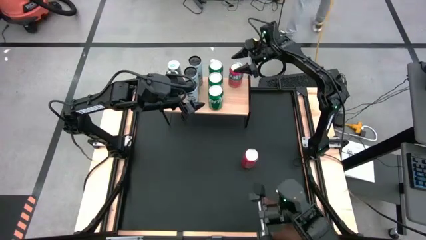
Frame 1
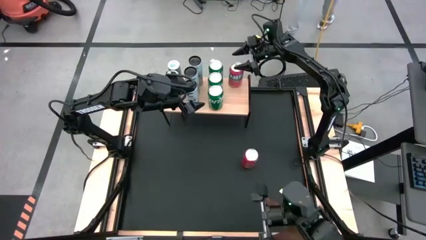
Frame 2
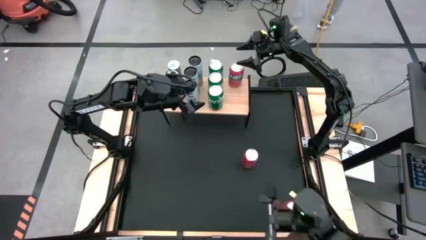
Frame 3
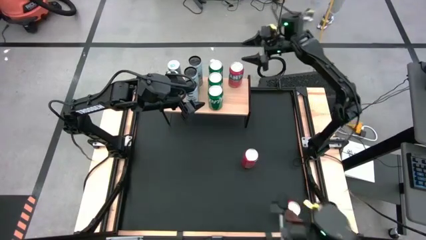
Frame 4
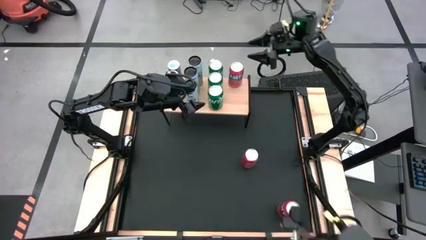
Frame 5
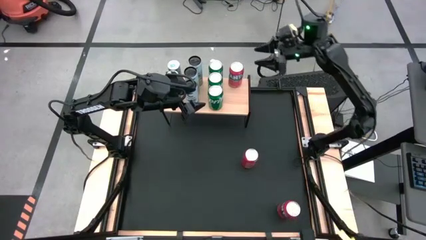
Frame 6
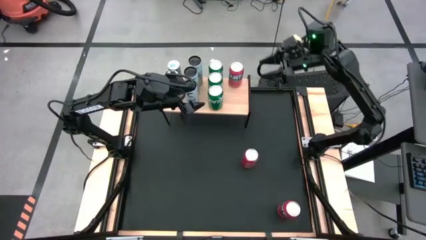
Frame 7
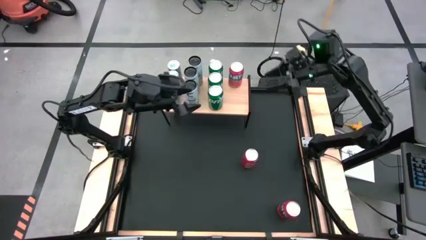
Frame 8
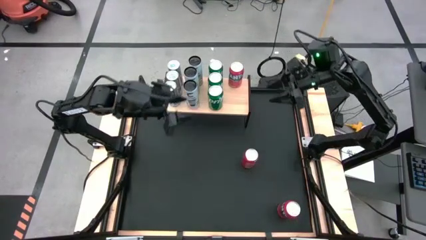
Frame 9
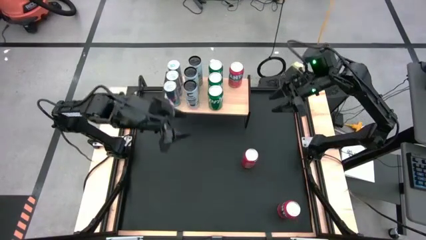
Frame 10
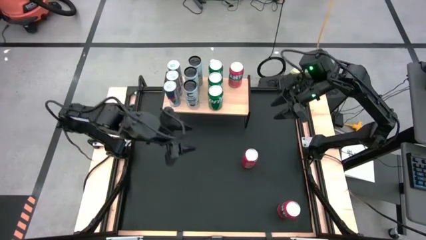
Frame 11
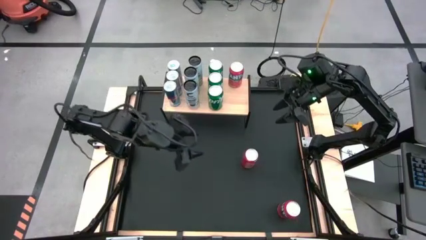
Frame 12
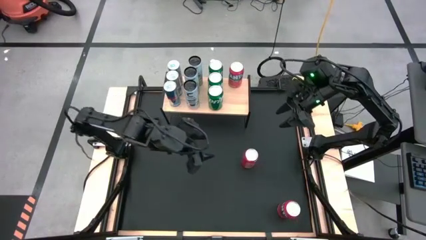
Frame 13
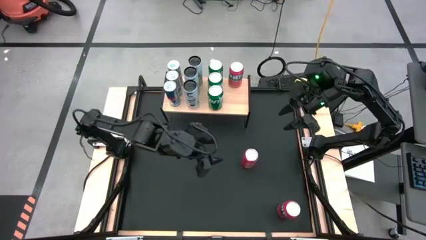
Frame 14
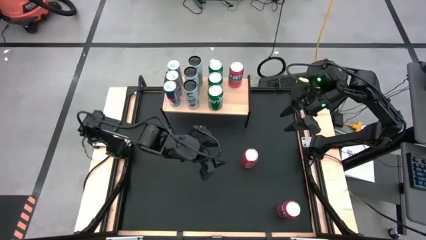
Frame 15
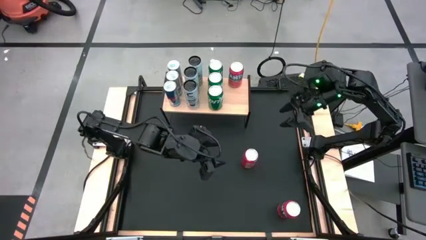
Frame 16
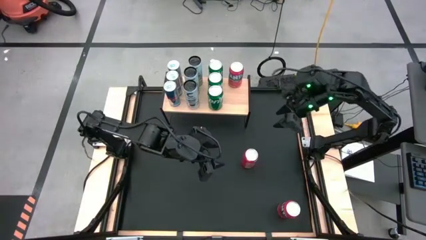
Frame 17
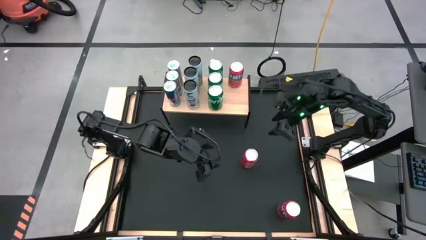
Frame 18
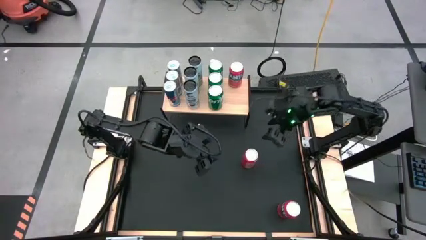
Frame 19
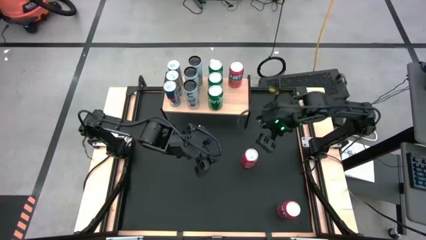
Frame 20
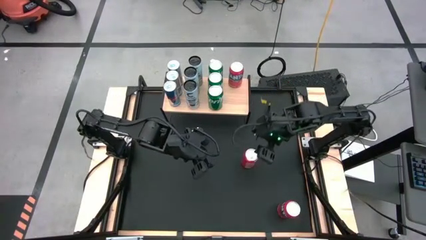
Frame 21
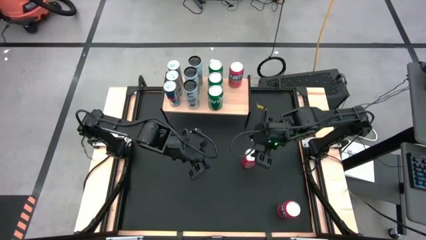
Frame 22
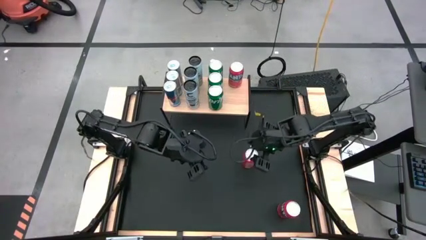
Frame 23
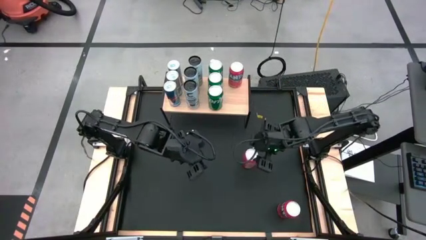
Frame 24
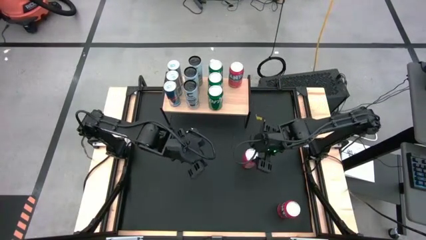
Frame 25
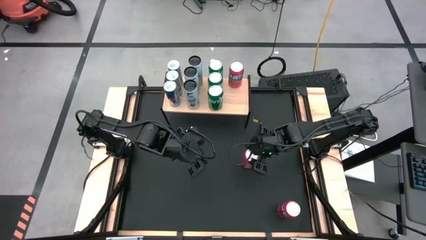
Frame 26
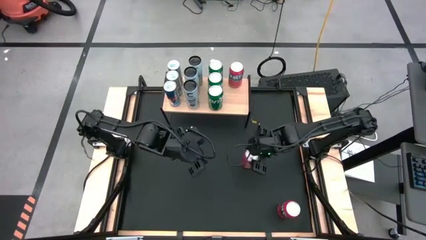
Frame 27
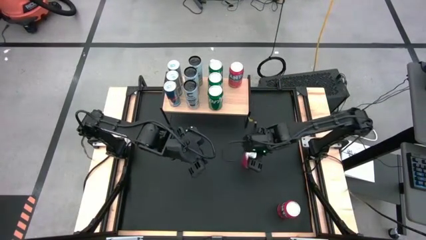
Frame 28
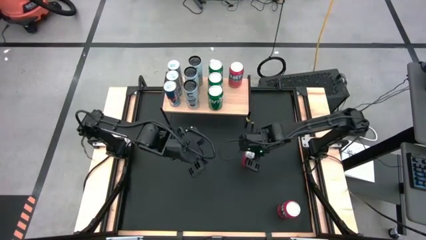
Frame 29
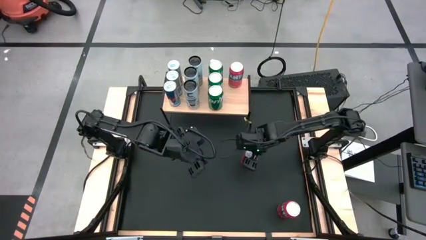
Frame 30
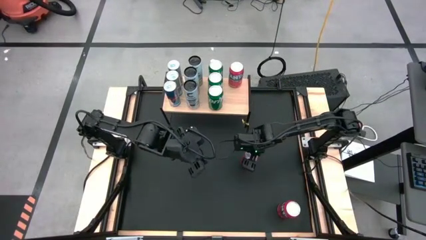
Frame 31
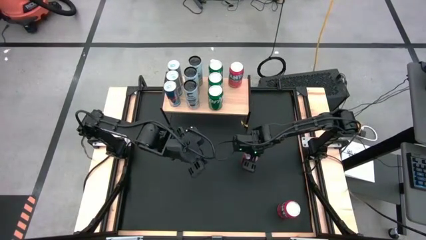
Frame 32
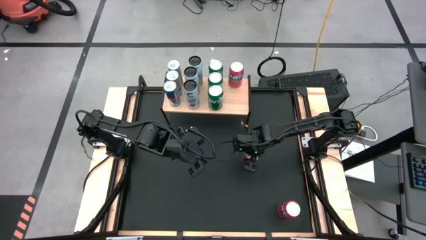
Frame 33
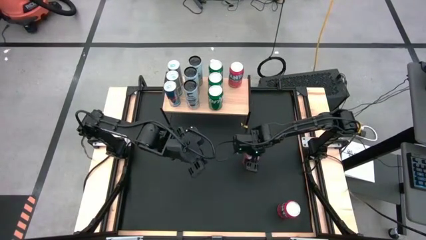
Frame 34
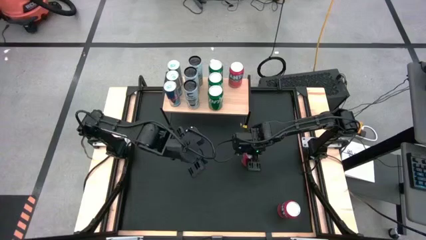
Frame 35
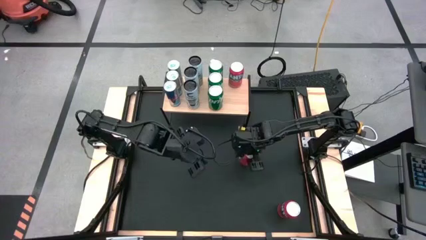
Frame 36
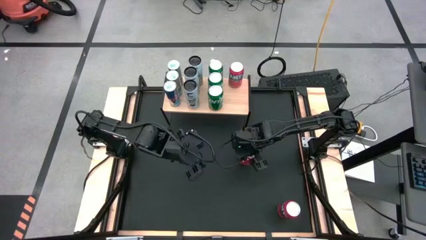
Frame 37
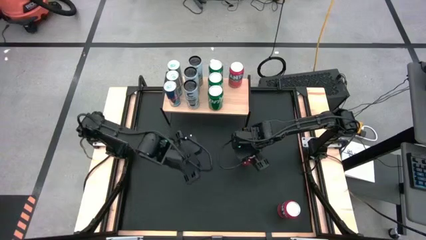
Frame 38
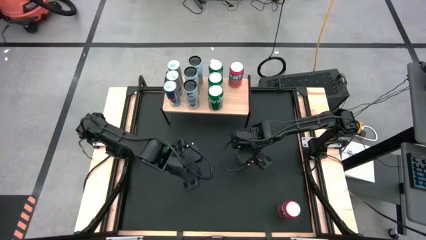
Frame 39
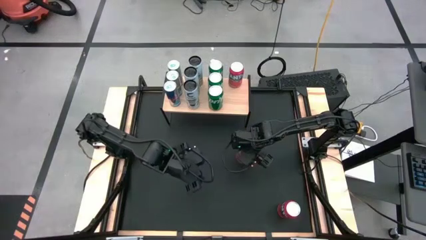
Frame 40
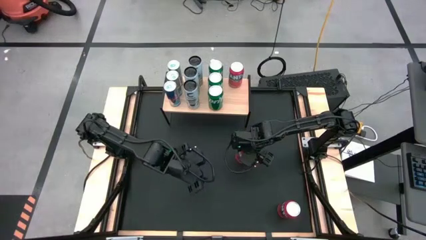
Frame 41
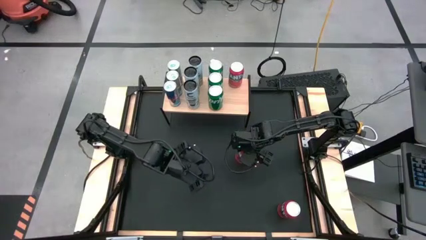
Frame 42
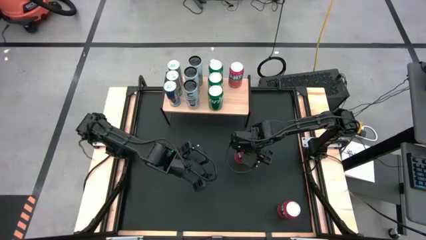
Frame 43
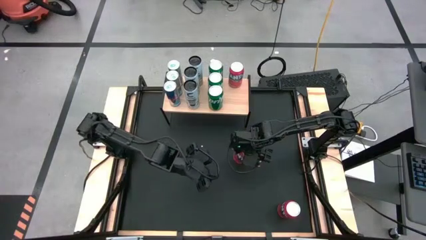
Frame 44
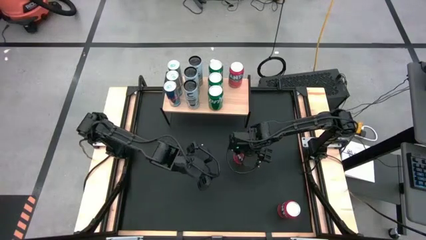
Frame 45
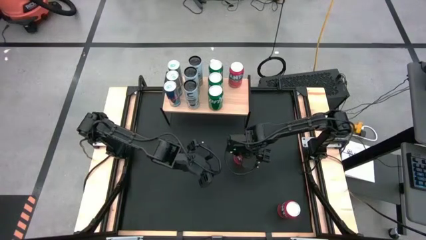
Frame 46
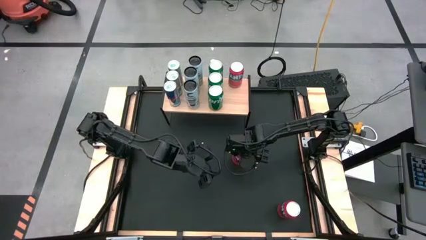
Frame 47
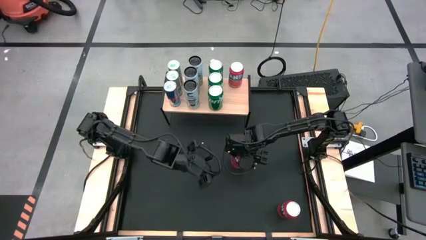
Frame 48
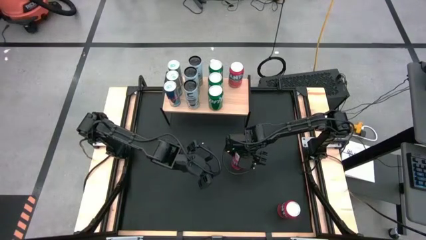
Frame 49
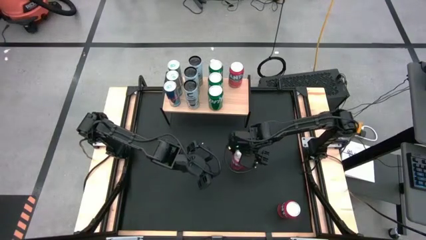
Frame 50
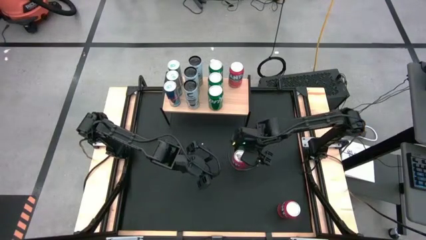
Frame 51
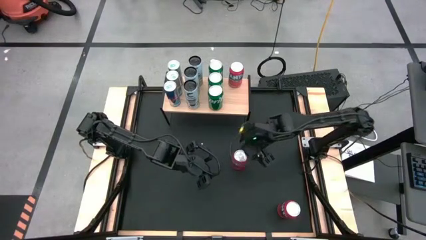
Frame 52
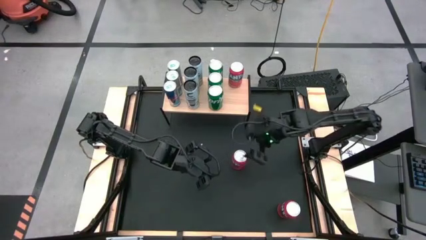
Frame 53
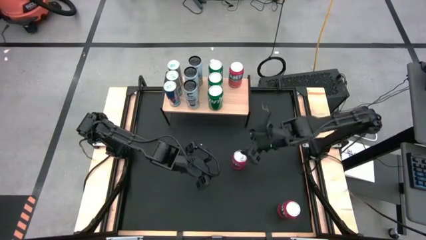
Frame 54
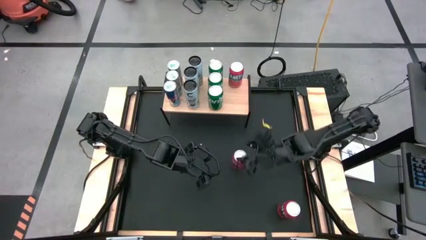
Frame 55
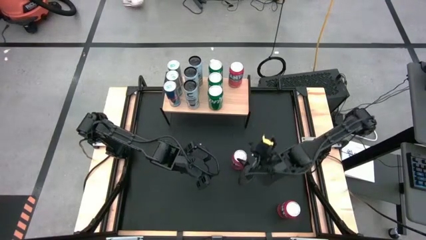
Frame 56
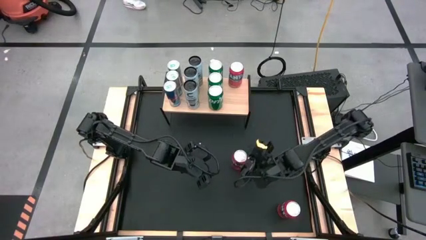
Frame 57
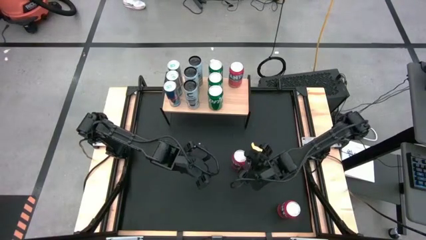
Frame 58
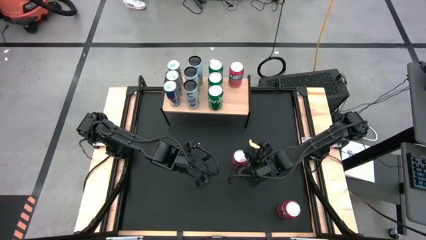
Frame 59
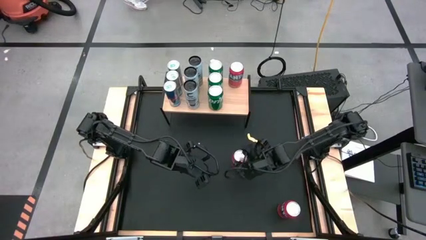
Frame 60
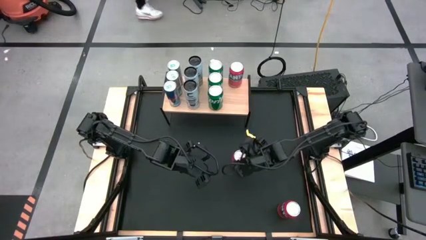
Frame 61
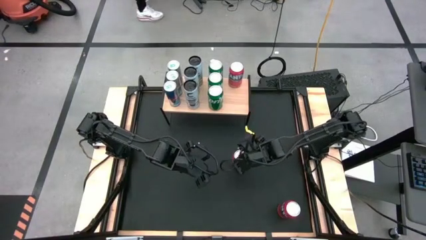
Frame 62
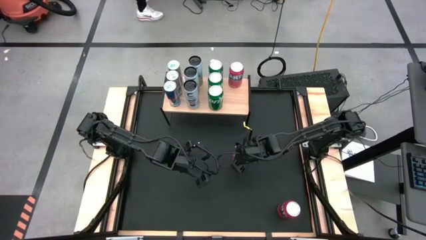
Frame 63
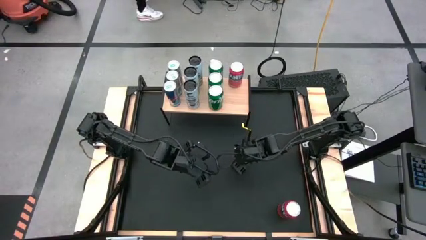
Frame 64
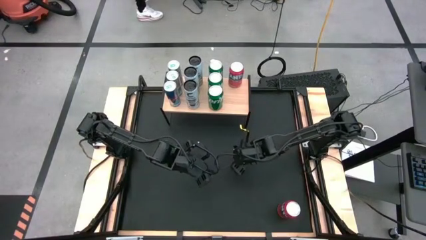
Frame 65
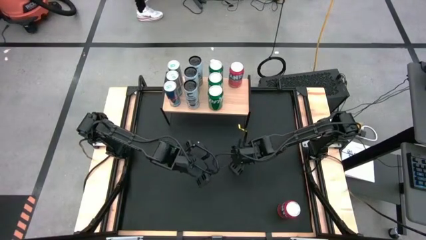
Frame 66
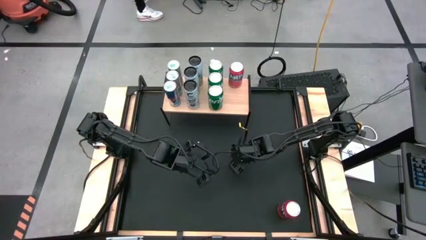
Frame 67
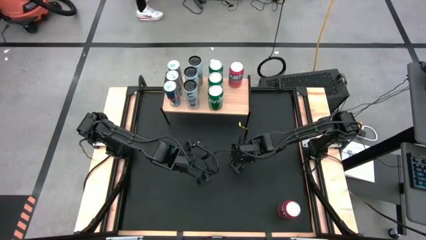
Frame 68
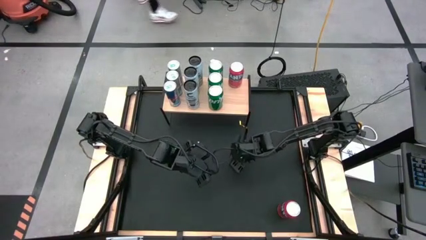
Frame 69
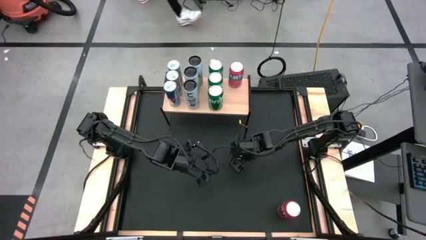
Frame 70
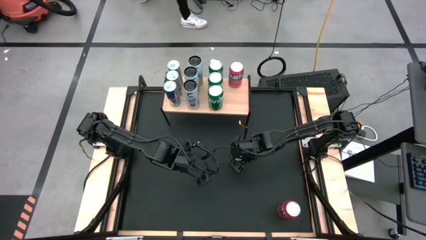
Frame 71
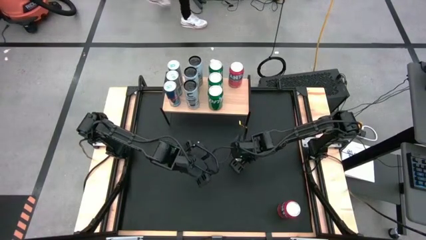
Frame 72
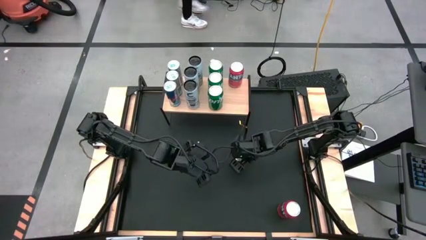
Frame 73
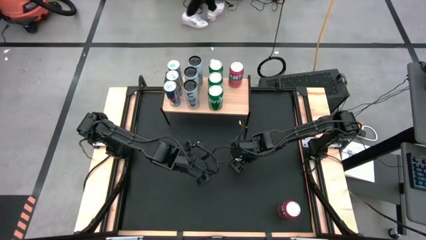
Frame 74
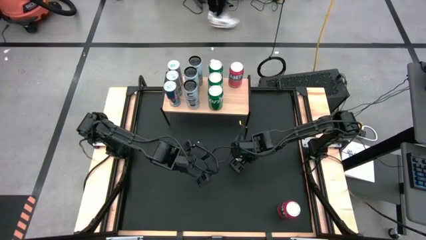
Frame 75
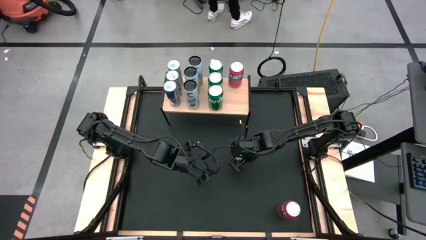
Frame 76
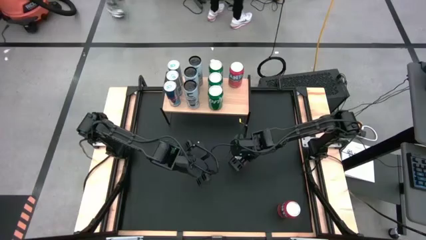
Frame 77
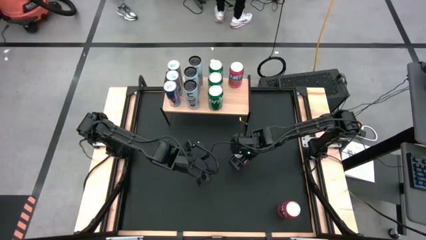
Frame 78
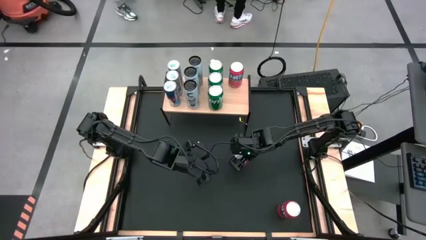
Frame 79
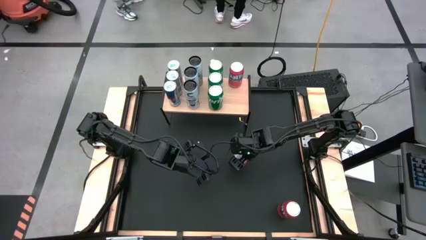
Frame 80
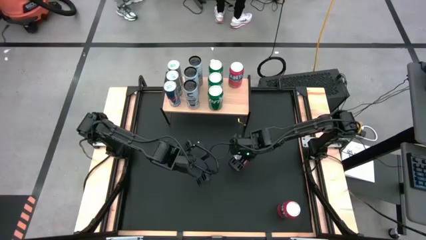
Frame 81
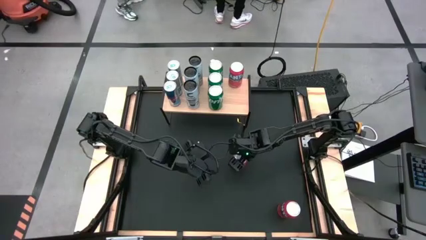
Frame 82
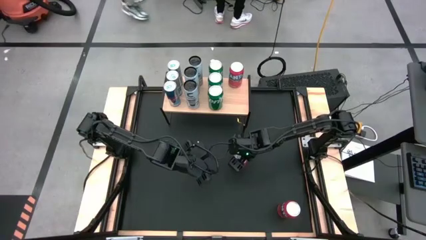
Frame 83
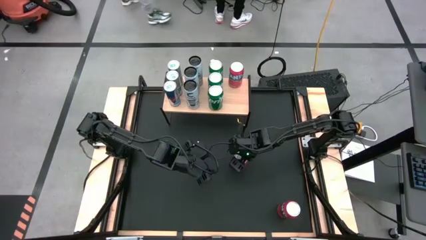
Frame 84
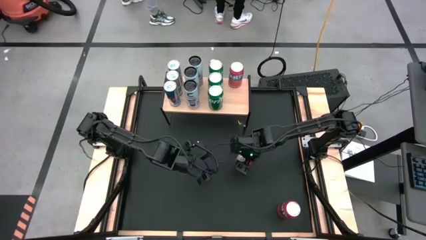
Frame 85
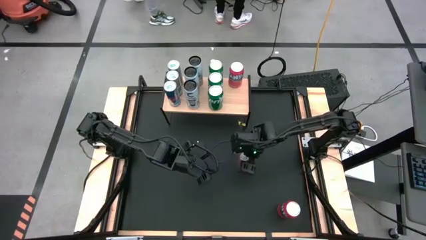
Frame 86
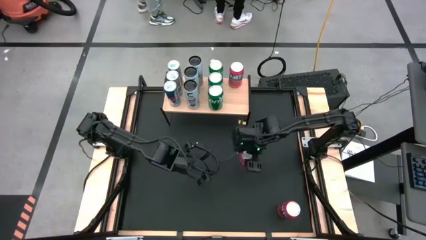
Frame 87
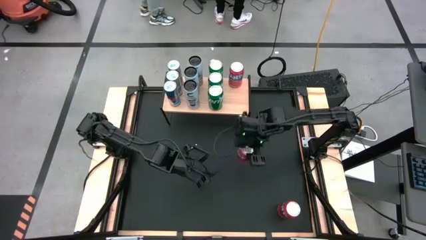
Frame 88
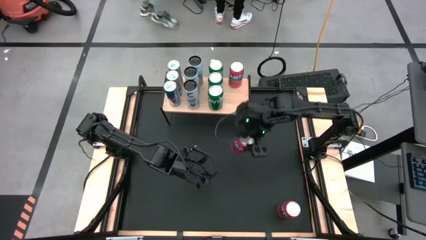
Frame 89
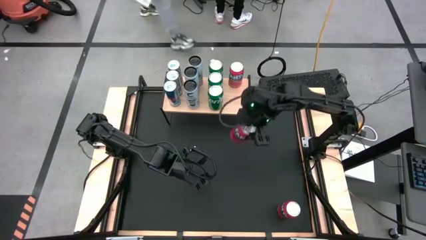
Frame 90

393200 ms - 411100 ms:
Task: Place canned beverage on shelf
Put the top orange soda can on the shelf
